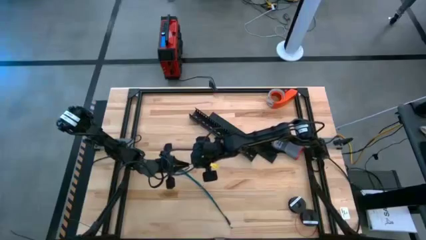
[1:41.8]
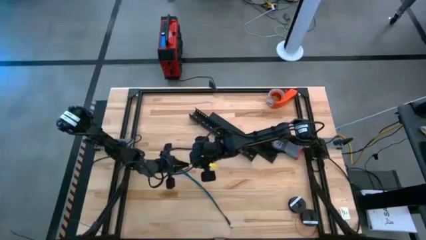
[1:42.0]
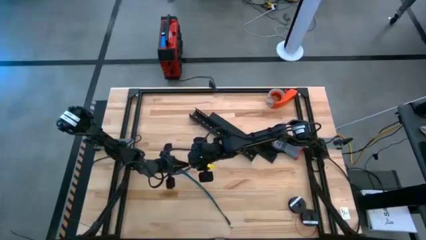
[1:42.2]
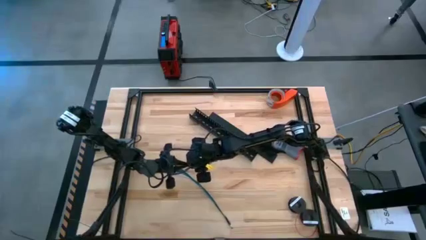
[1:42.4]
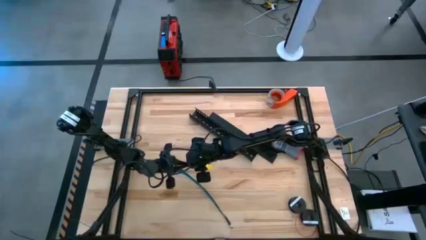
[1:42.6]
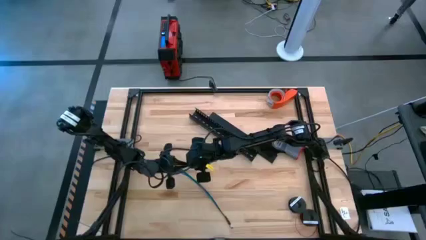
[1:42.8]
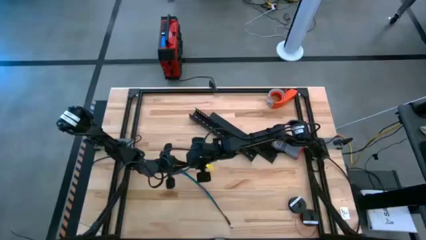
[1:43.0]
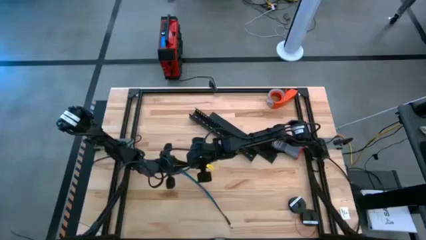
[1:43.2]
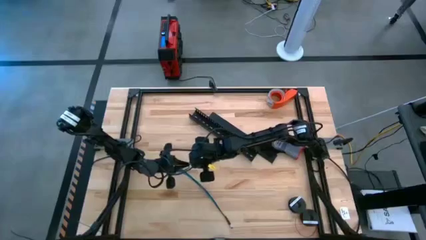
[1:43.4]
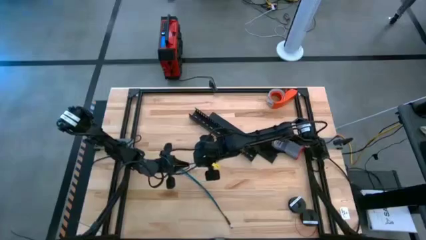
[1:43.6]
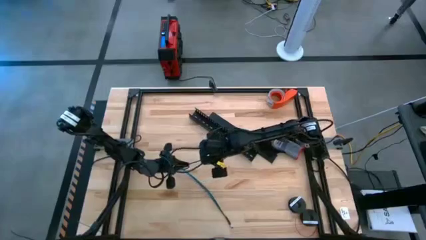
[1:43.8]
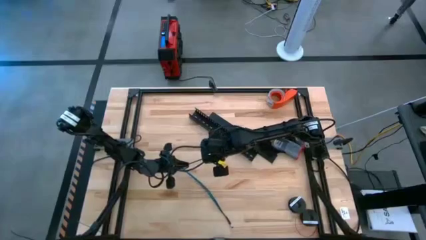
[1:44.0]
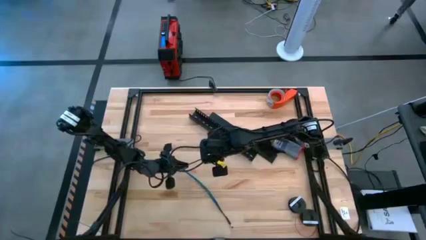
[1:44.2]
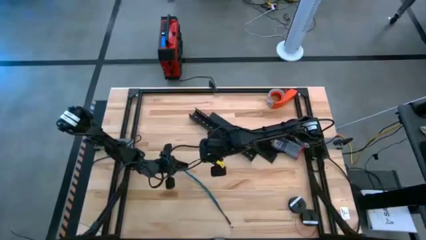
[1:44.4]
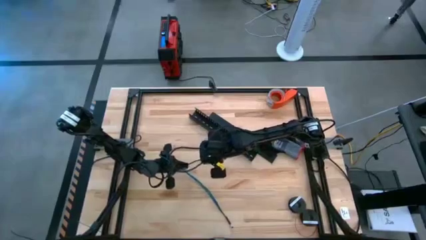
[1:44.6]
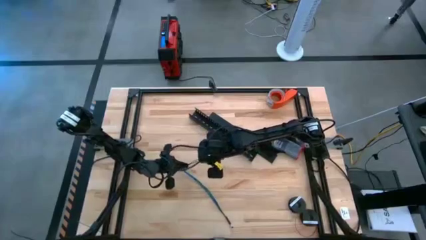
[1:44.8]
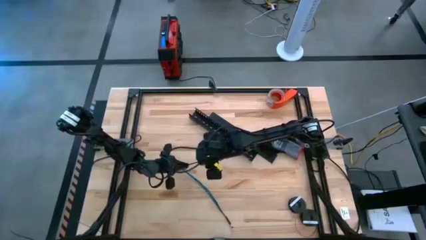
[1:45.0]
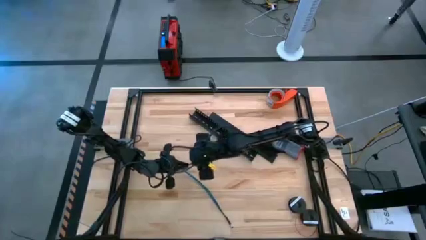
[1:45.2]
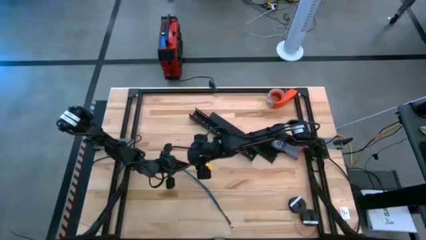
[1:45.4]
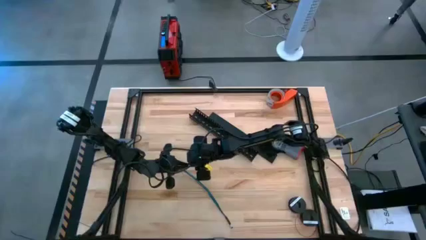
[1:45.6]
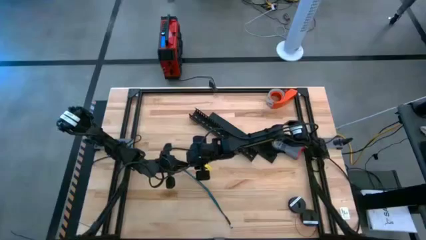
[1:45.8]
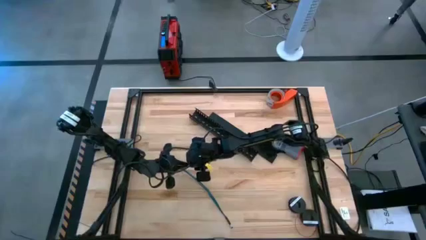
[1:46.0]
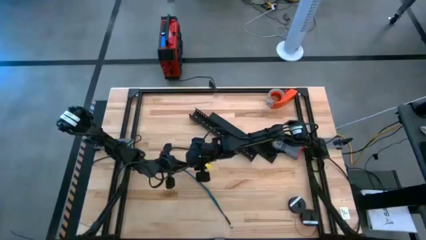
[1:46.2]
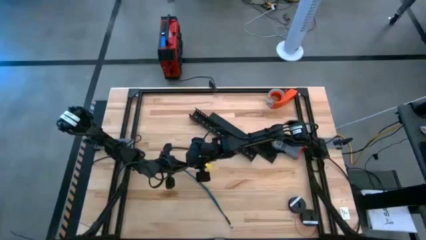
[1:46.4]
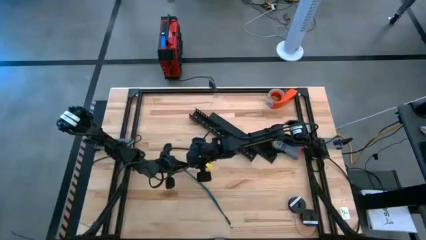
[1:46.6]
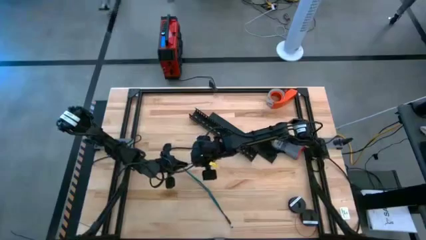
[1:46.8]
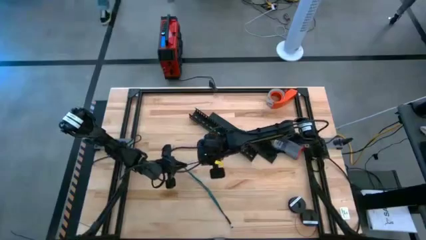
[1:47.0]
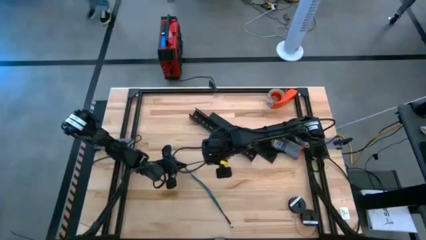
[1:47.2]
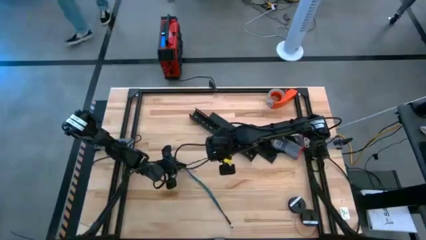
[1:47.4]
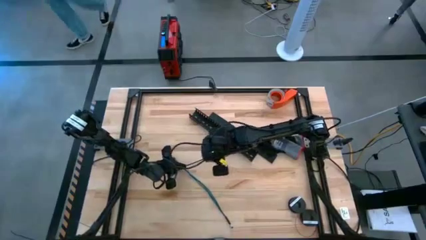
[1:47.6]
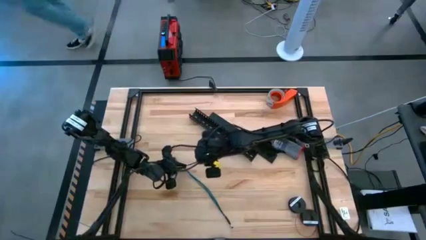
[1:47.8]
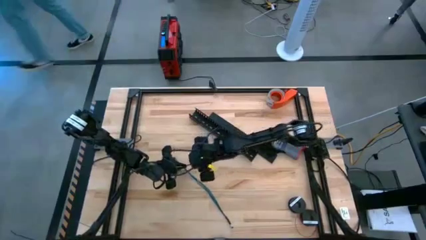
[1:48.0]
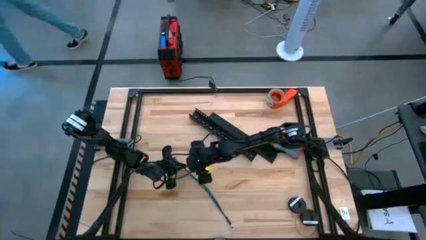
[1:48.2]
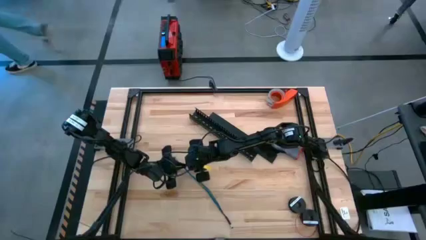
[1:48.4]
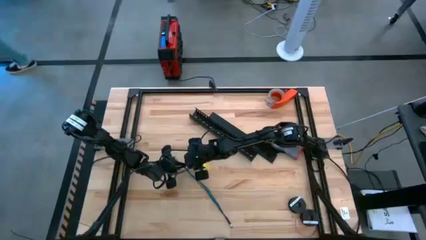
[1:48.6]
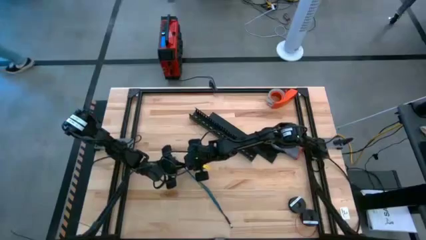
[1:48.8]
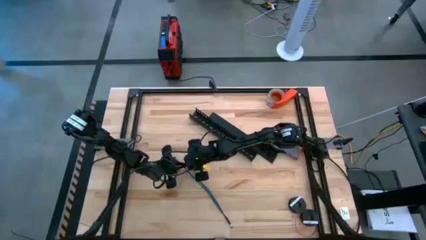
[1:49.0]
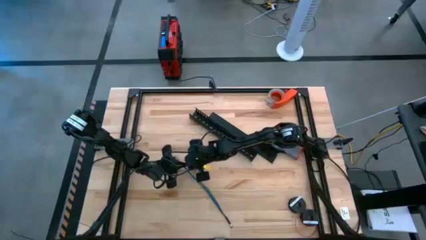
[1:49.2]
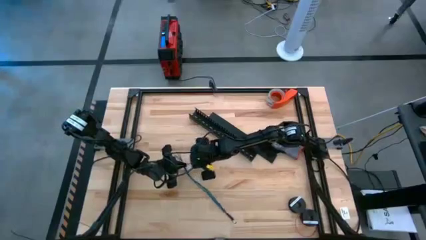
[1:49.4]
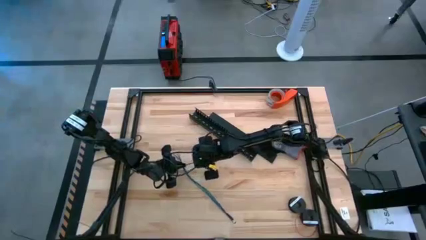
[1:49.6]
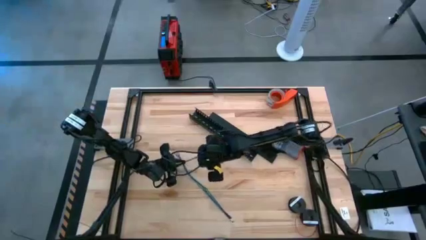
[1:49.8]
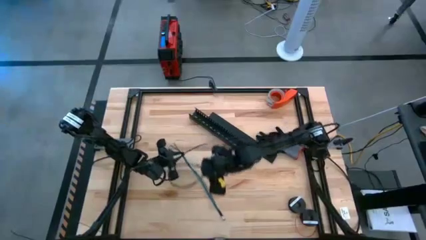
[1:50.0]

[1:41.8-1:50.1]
Task: Ziptie cables
Wrap the zip tie around the cable bundle

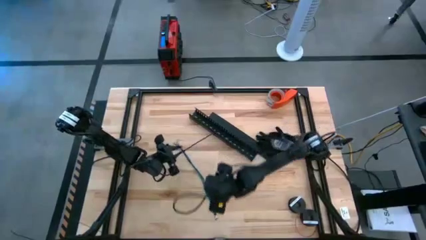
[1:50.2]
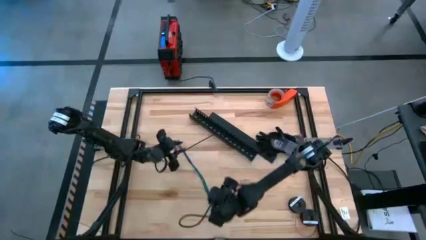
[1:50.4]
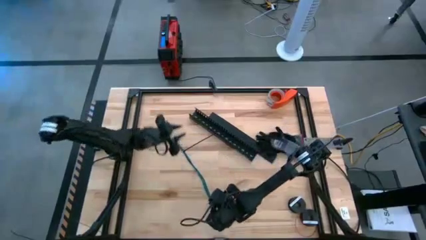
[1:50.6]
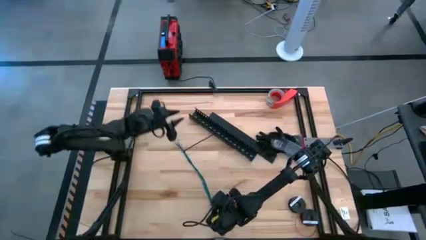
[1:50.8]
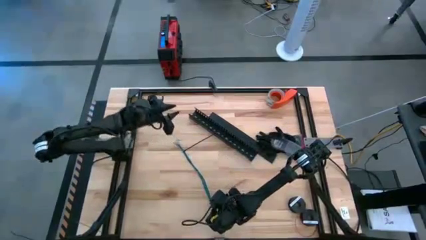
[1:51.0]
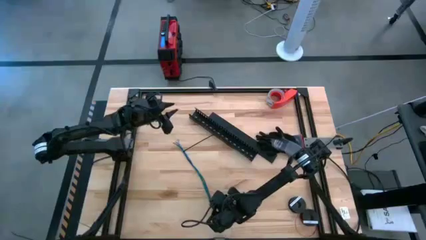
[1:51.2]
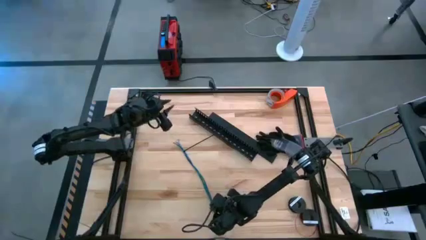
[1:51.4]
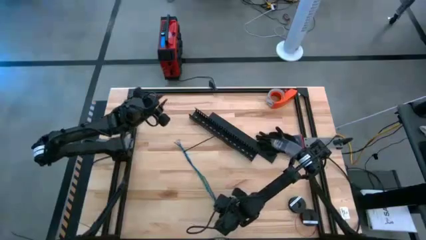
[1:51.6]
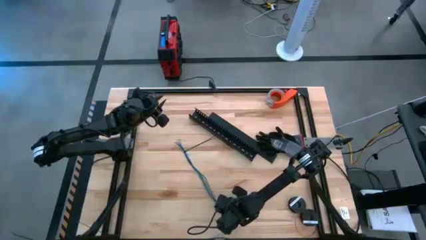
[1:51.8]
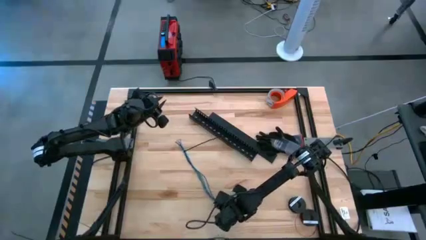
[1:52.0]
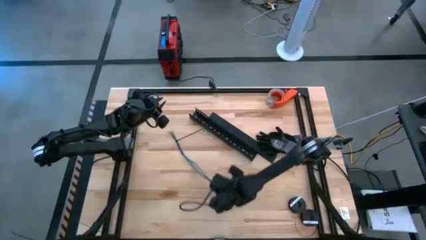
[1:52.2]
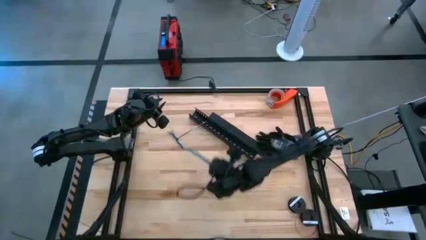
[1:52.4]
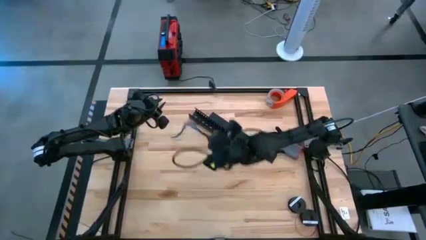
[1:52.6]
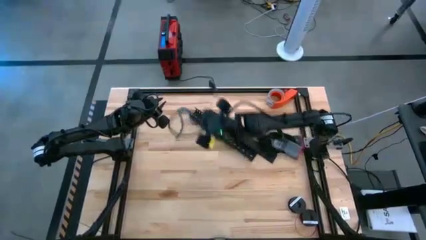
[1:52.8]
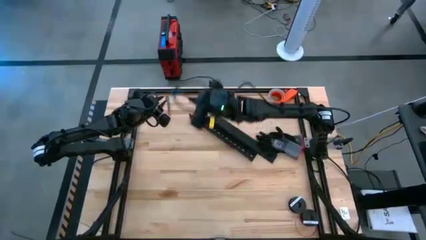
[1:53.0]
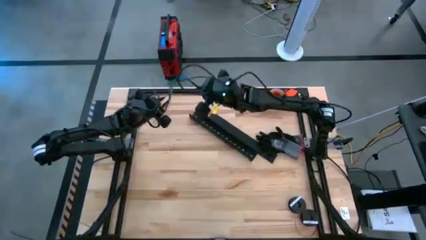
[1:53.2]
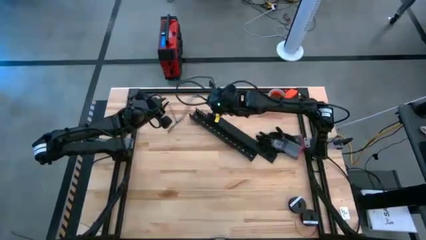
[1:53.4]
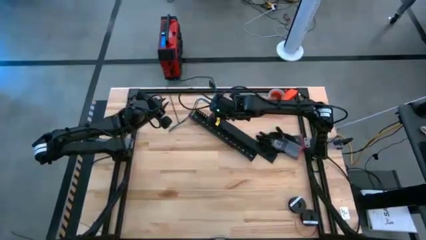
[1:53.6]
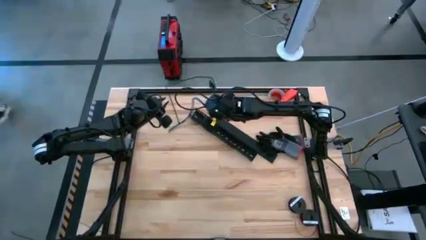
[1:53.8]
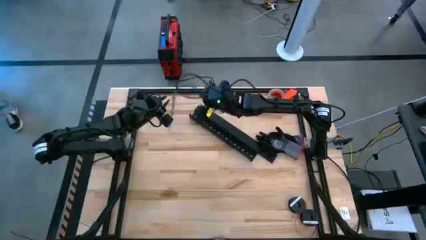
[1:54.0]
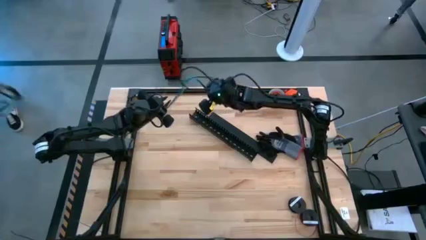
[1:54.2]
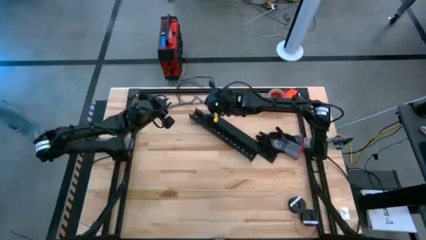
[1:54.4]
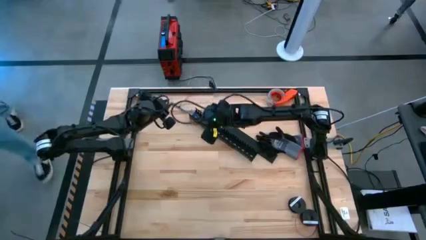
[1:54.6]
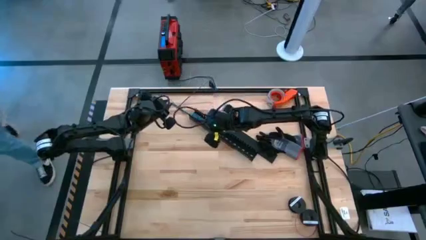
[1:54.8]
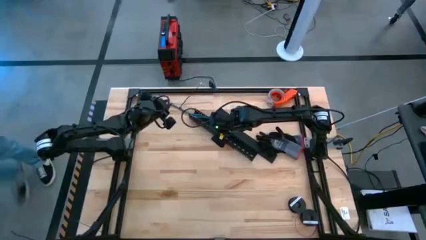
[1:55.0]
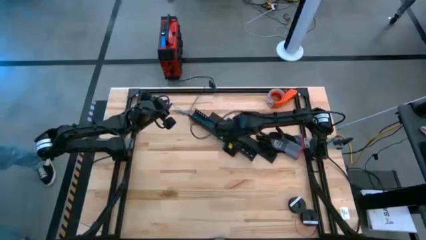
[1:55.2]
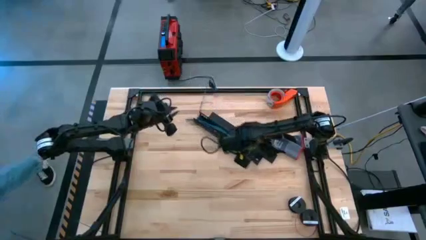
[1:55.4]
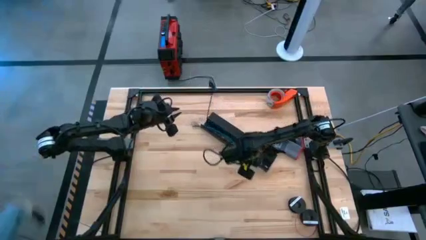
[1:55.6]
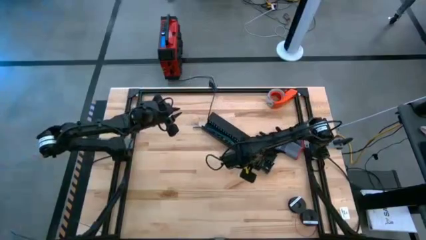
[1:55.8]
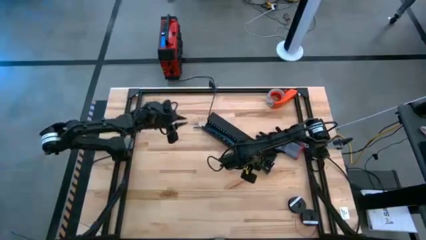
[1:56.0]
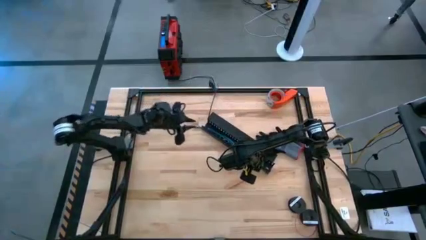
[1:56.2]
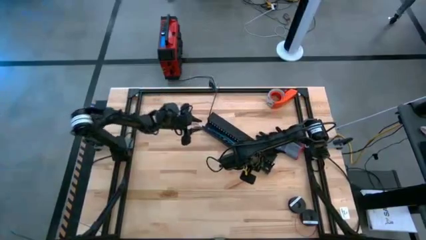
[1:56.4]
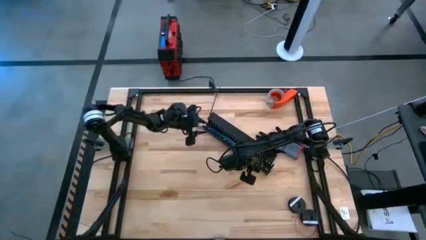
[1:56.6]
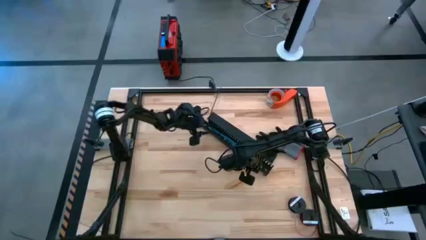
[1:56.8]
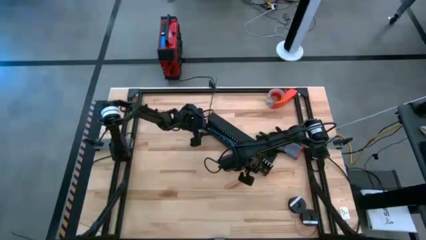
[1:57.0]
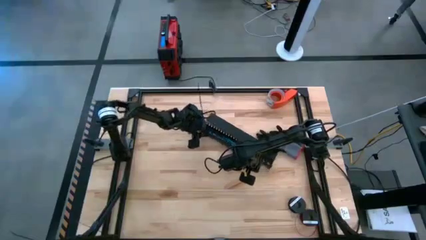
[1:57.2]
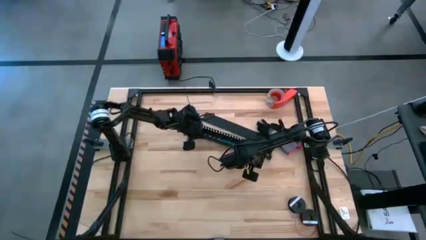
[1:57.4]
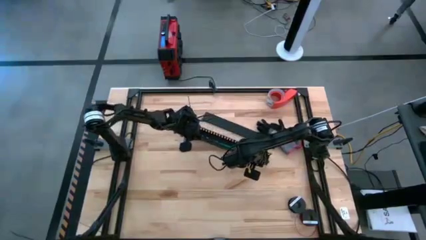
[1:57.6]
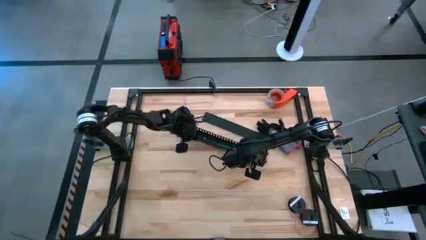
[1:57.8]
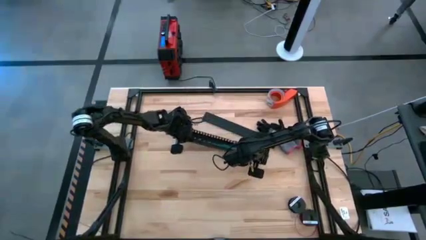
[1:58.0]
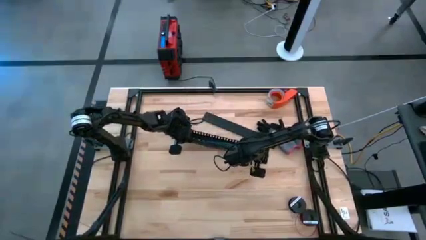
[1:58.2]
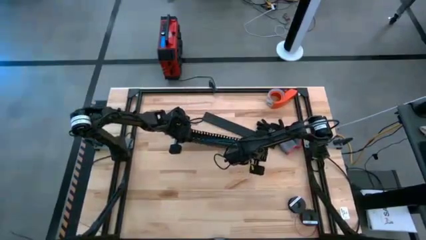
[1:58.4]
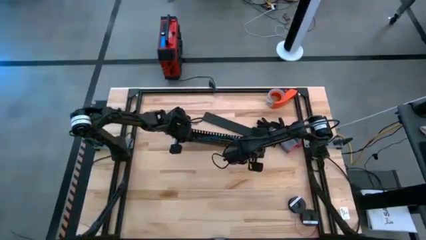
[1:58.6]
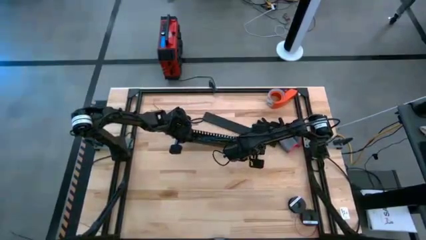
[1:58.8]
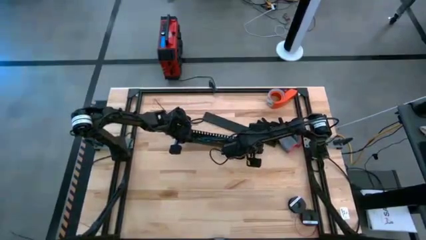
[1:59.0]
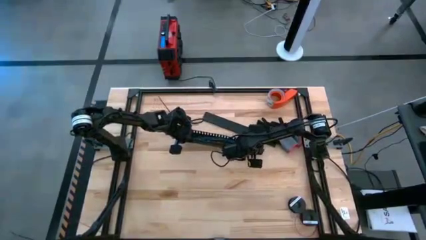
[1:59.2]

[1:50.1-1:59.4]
Put the zip-tied cables into the black cable duct
